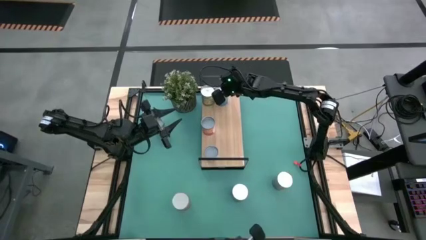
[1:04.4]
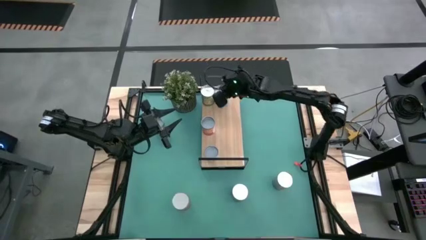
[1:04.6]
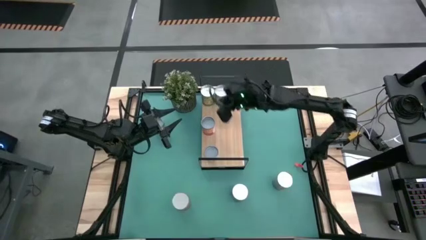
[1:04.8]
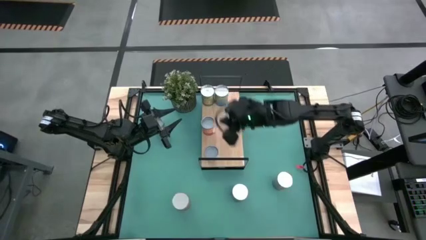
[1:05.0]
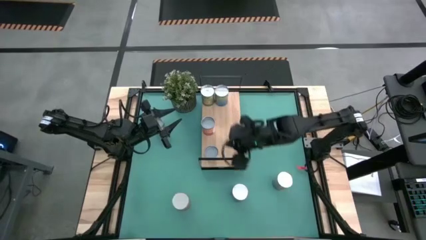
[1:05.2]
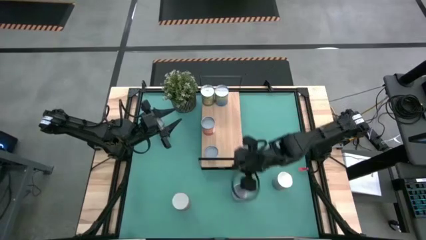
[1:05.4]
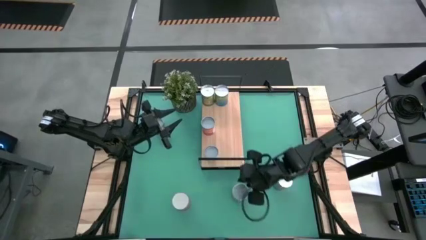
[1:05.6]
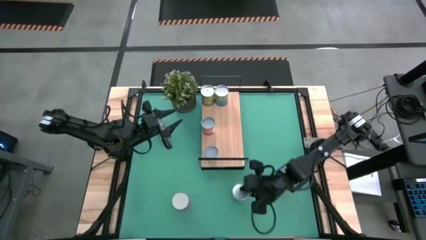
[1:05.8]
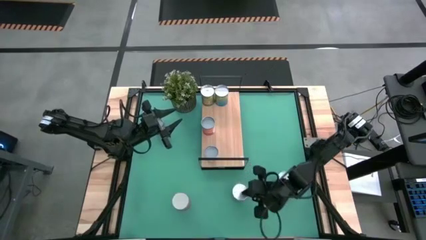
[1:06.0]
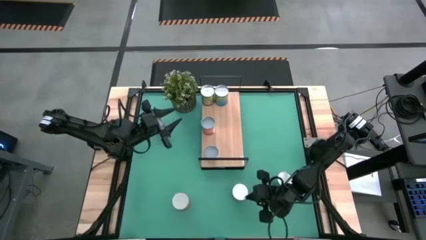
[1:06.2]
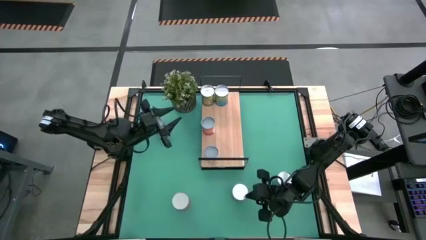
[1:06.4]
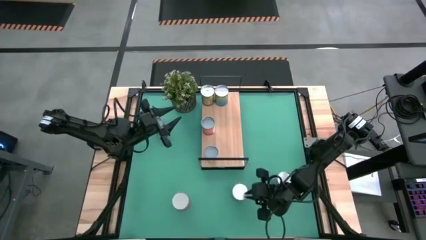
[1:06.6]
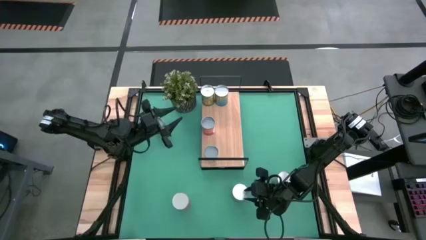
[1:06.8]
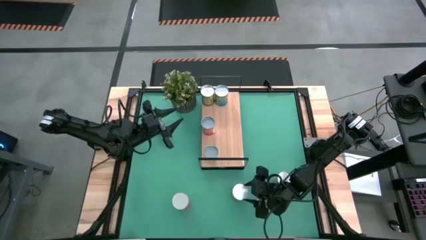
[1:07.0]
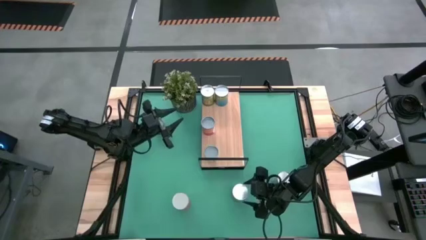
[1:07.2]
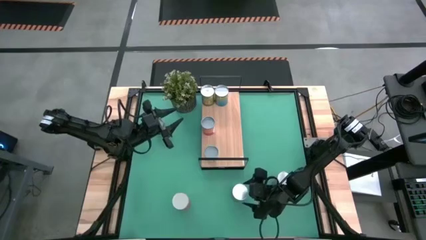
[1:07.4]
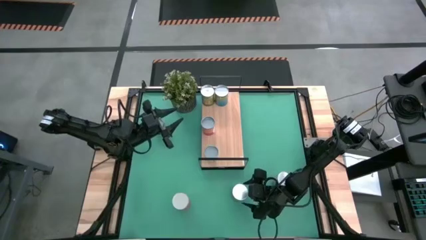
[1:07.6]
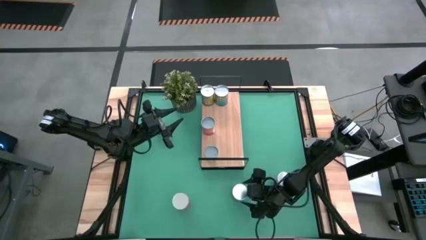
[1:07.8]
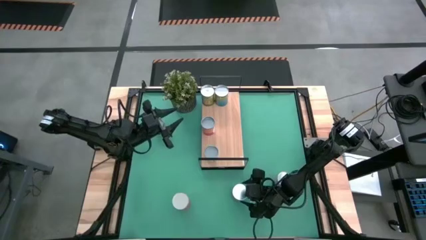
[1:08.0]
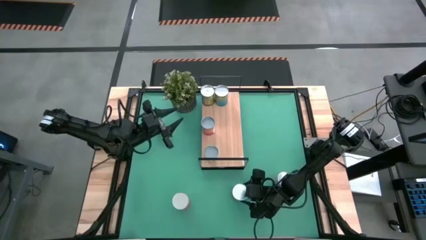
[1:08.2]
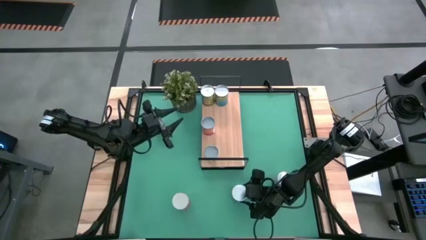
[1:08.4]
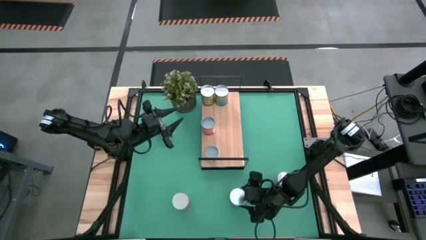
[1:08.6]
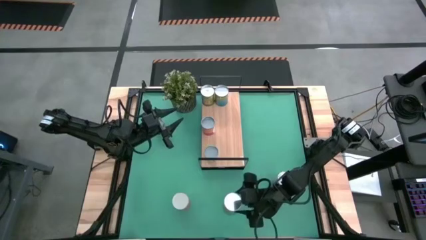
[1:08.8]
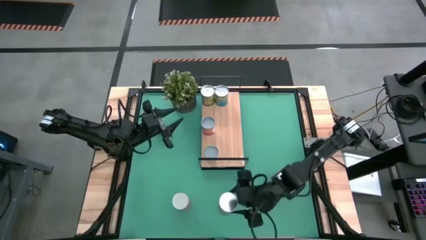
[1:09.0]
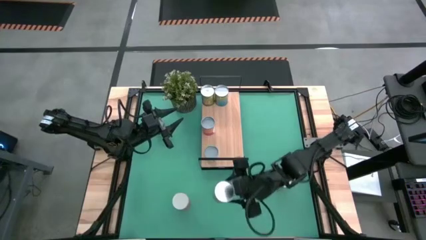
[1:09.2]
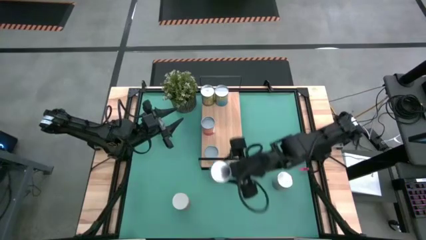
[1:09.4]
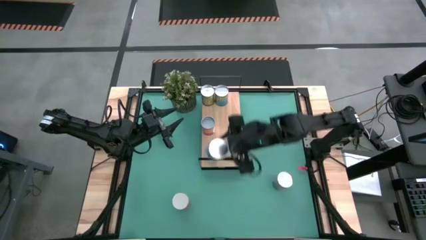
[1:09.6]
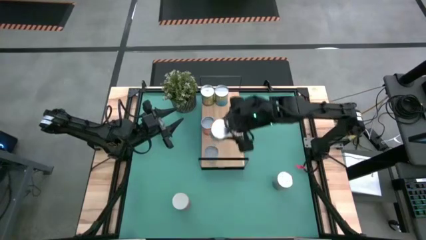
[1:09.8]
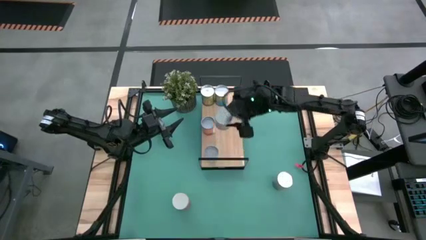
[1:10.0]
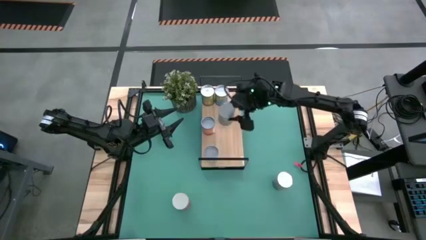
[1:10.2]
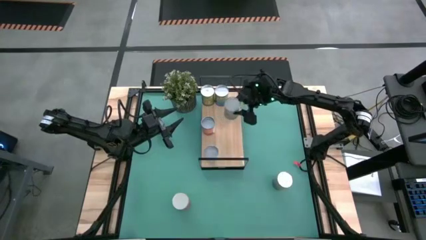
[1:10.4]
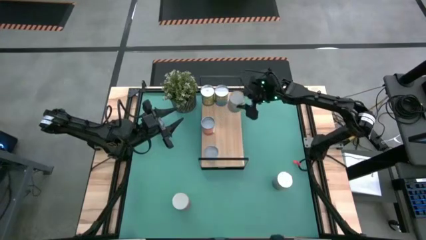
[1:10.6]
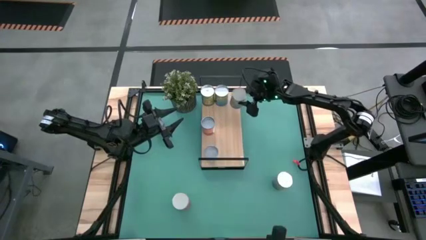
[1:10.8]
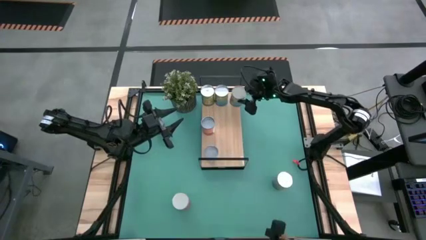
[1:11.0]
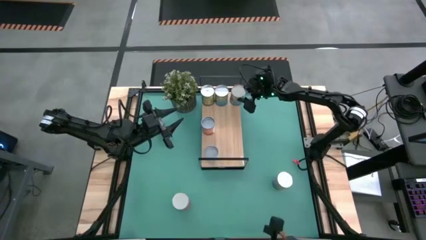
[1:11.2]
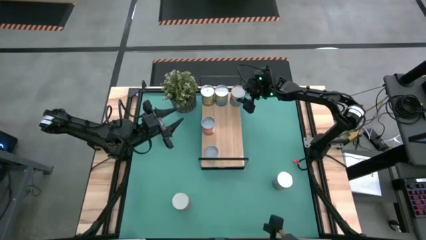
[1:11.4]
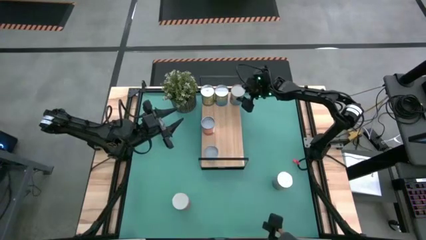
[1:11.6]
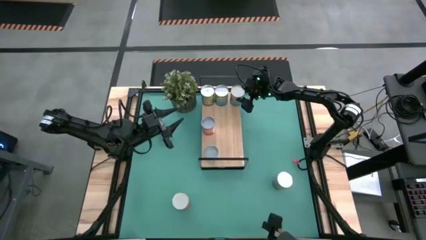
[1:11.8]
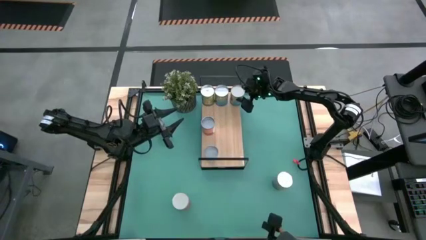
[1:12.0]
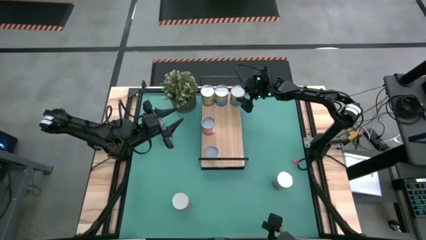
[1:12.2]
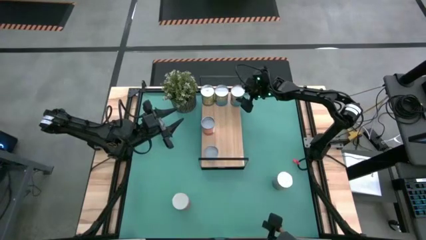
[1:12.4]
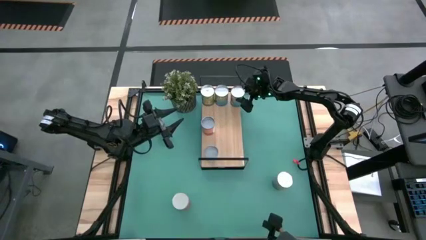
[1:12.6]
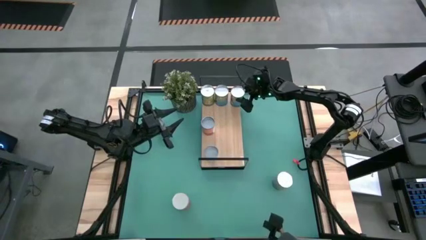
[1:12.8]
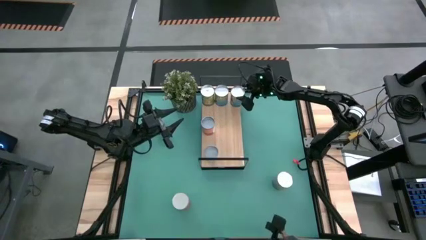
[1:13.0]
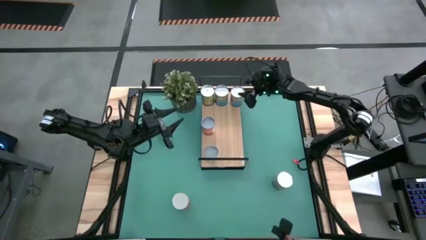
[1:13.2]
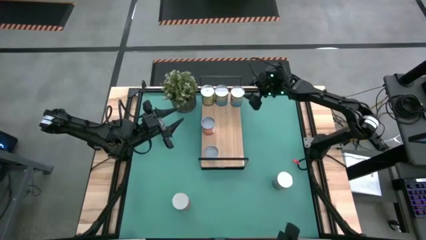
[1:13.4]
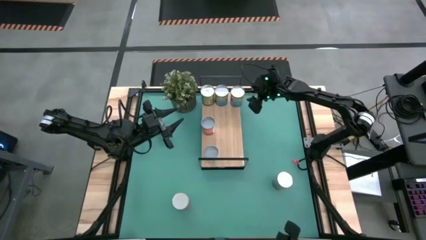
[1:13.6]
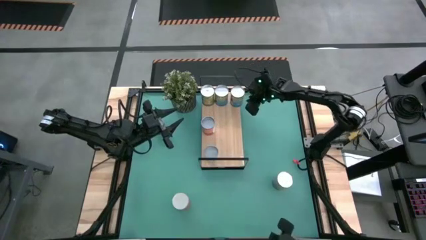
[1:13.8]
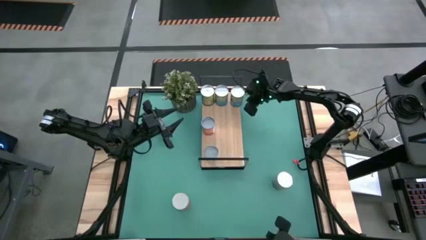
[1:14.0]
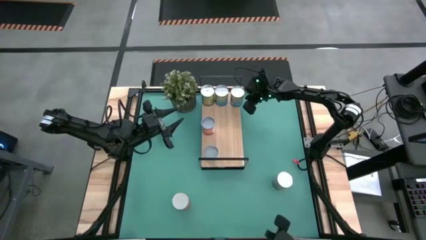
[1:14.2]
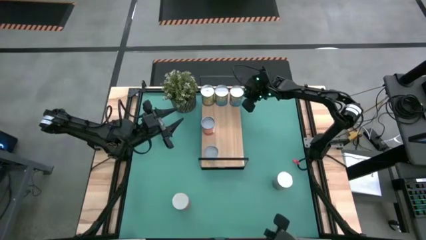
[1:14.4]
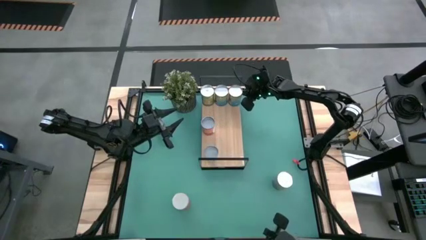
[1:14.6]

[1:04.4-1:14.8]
Task: Pick and place cans onto a shelf
Put the canned tomatoes on the shelf

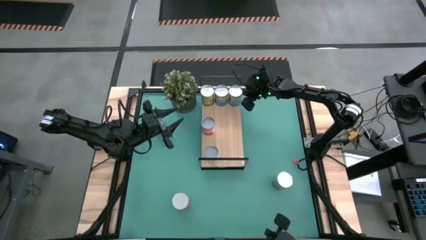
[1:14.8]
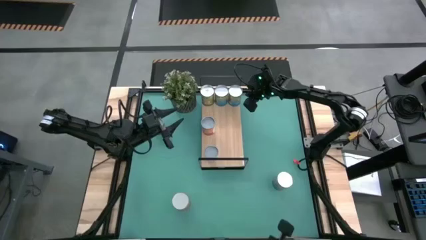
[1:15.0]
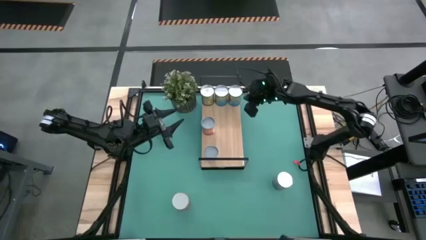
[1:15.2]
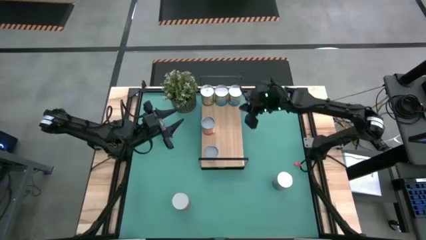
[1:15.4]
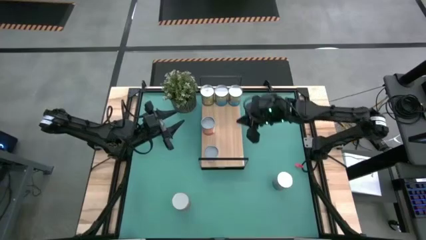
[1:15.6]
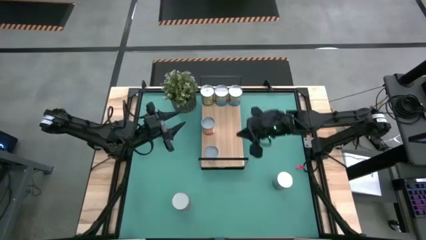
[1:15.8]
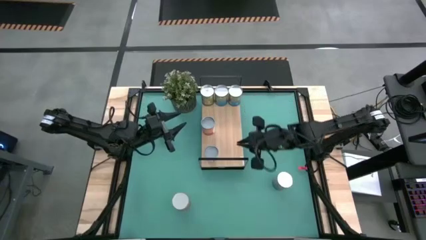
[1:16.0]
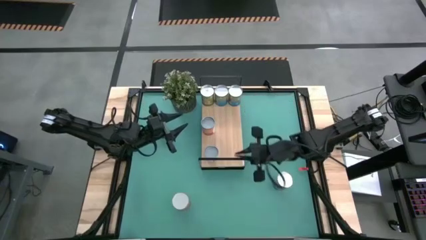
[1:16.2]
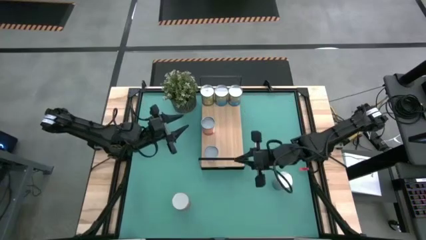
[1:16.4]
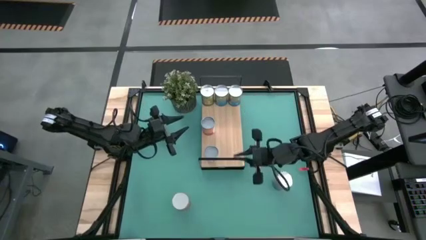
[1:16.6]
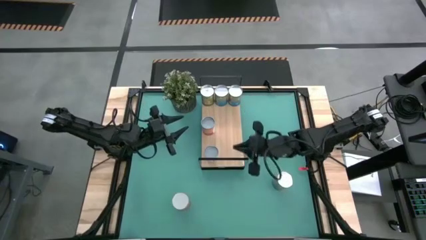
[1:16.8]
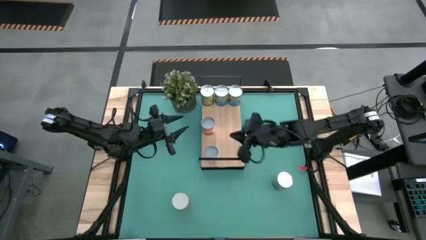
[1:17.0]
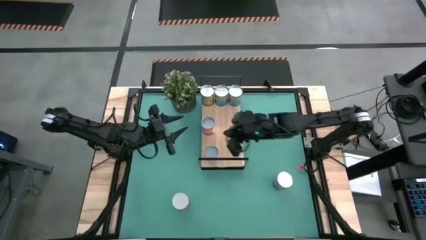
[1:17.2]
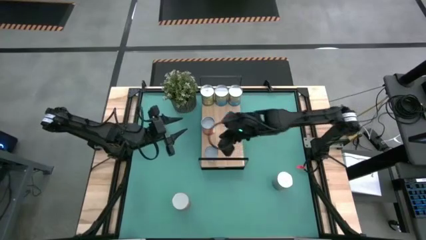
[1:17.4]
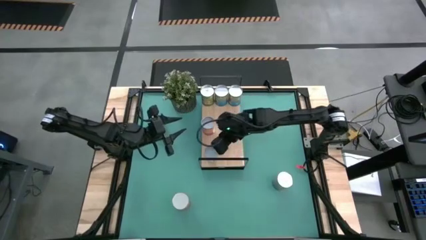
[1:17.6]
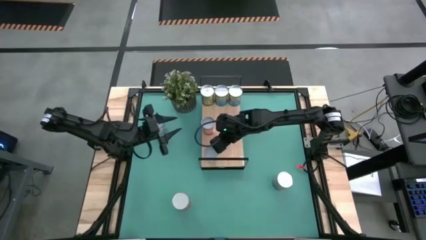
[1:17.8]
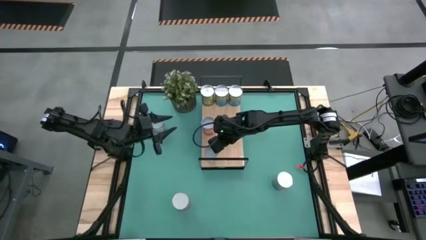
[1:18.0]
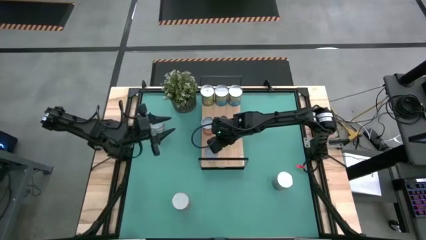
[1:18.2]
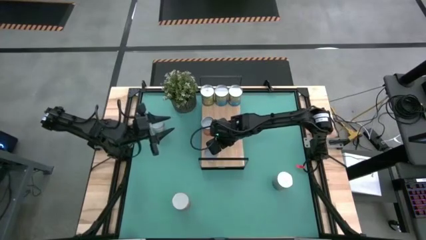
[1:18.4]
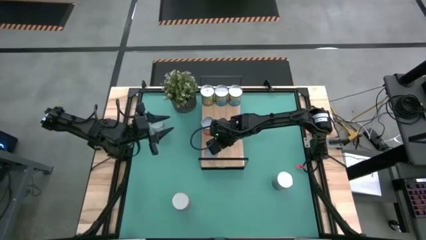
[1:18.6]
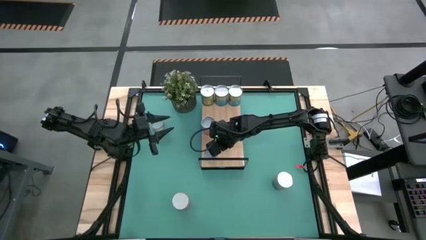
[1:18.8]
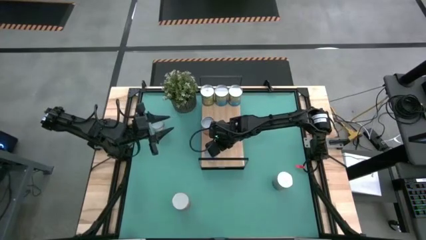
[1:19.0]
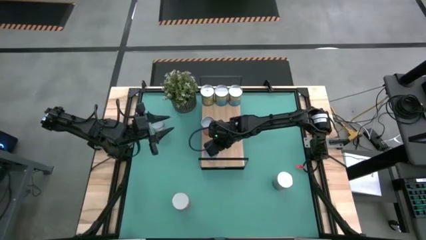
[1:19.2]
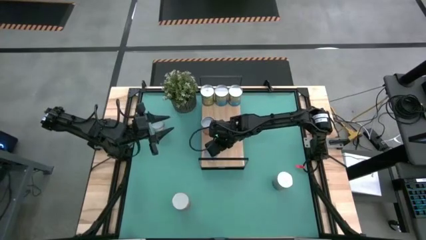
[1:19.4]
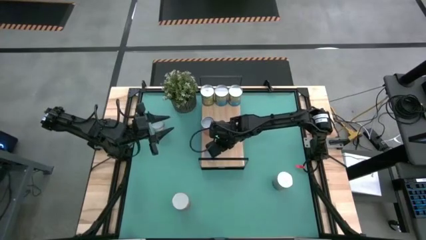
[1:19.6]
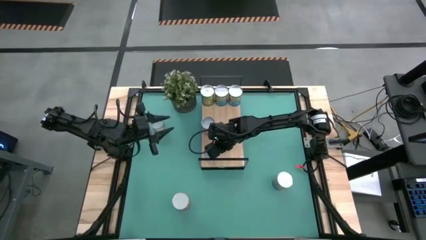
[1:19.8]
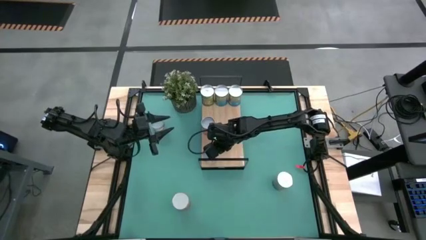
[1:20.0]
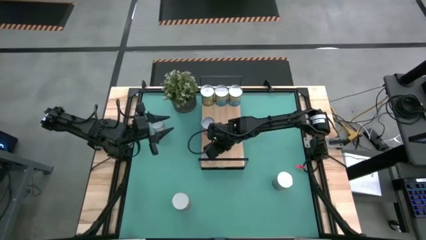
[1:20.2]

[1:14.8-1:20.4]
Adjust the canned carrots on the shelf

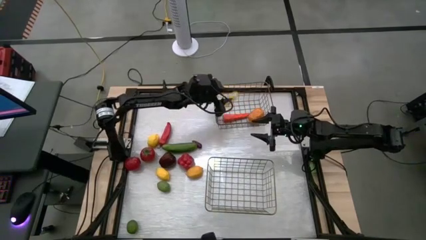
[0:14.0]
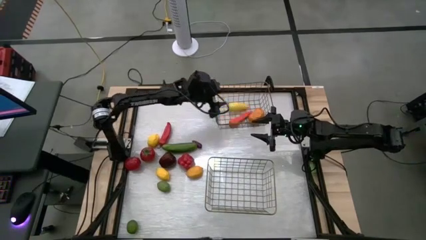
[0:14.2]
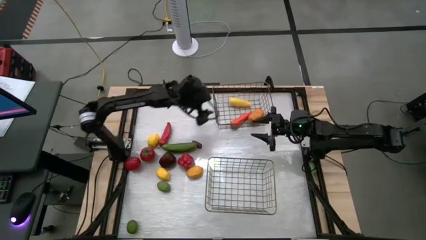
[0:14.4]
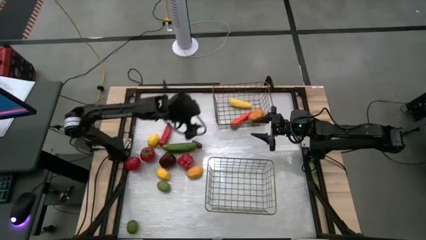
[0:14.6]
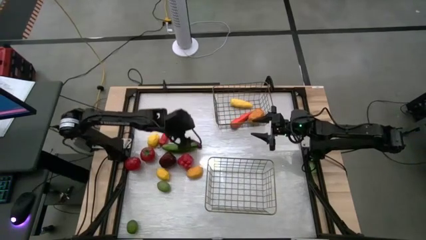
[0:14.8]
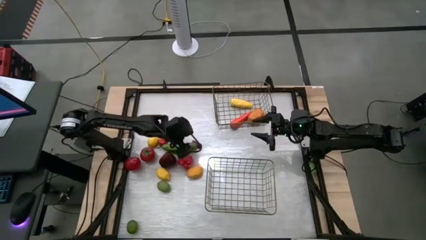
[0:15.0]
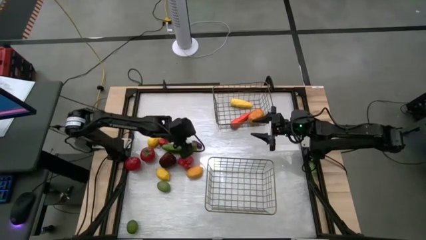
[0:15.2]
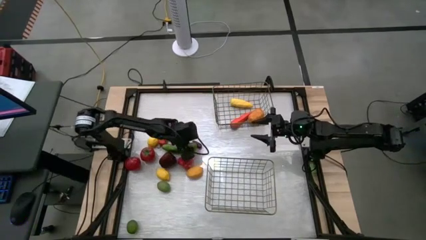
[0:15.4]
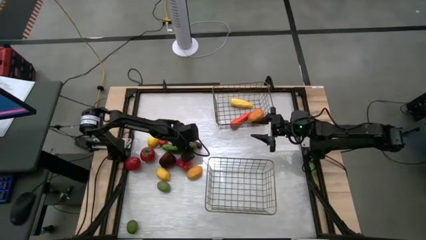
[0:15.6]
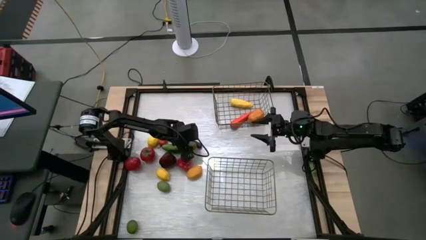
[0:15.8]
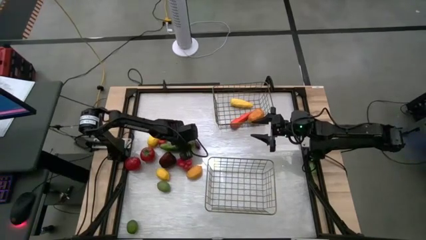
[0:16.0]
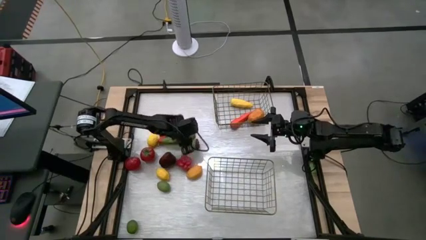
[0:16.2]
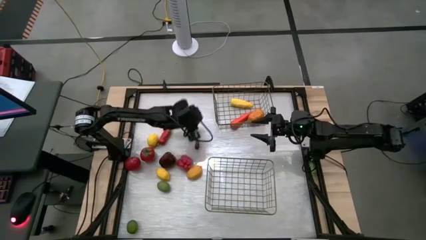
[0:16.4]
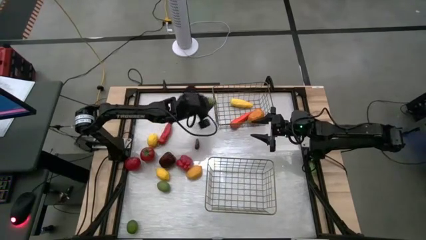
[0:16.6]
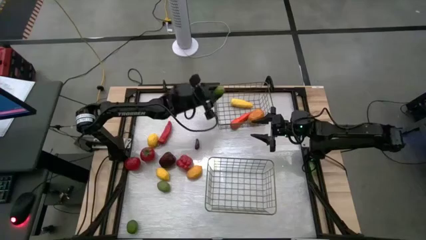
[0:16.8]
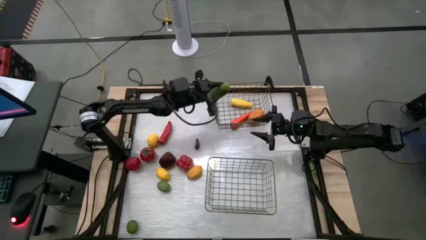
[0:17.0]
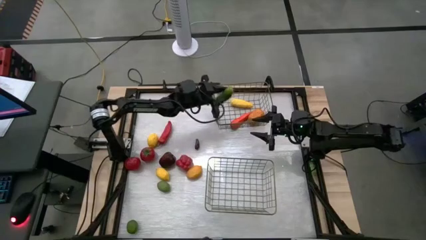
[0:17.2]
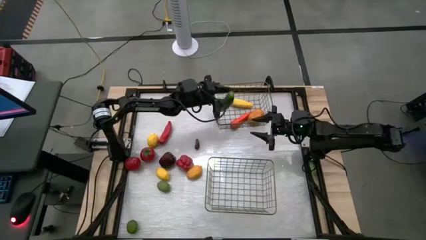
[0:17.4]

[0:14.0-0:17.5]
Task: Sort produce into baskets
Put the green cucumber into the top wire basket
